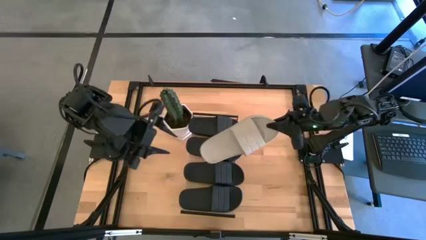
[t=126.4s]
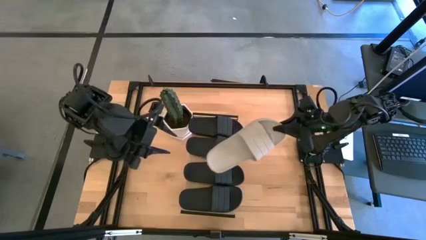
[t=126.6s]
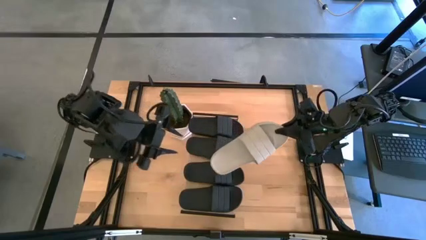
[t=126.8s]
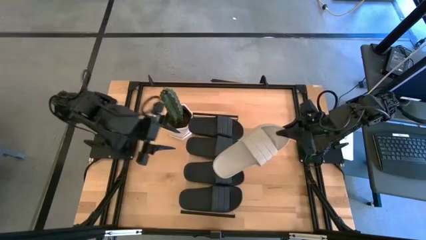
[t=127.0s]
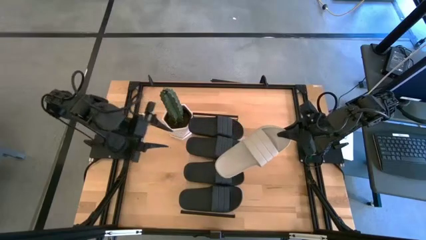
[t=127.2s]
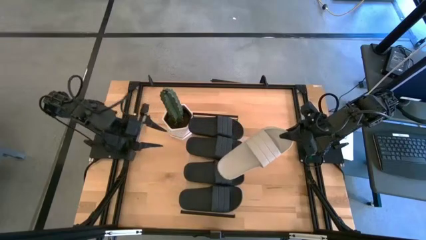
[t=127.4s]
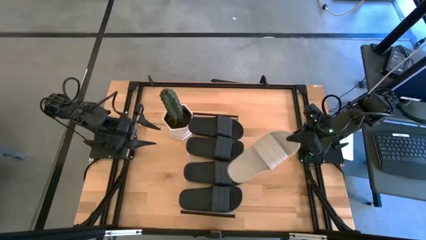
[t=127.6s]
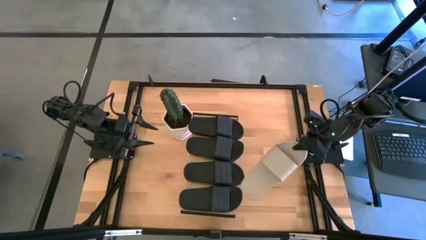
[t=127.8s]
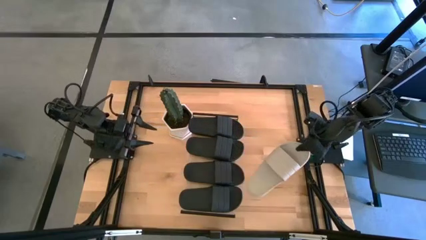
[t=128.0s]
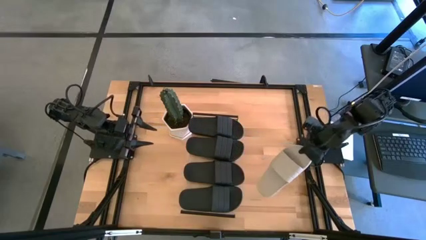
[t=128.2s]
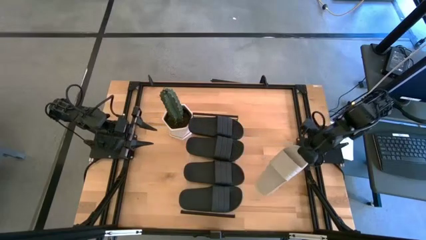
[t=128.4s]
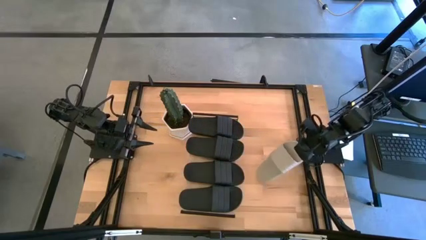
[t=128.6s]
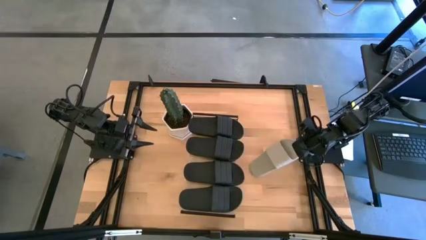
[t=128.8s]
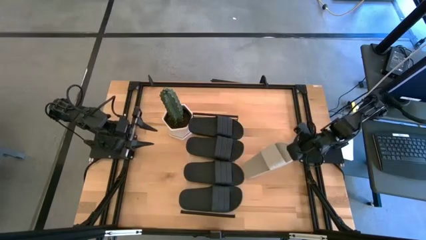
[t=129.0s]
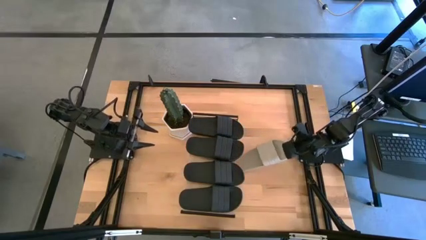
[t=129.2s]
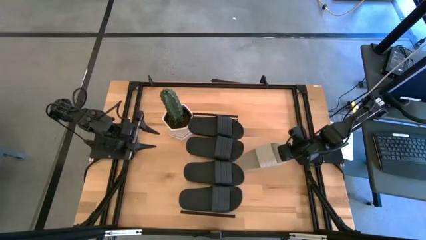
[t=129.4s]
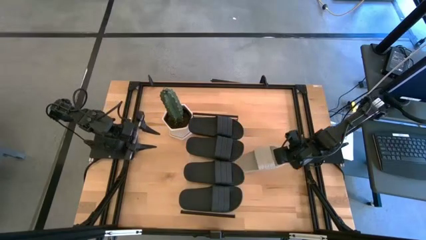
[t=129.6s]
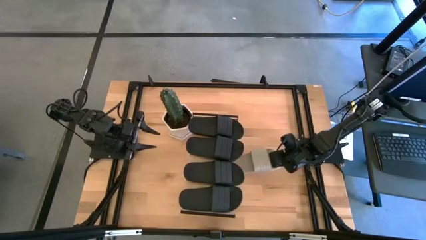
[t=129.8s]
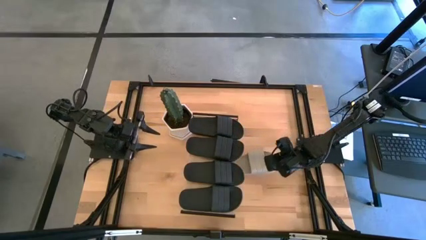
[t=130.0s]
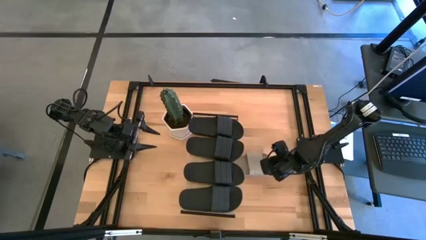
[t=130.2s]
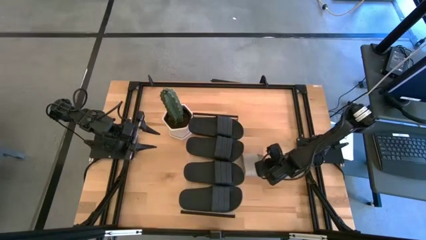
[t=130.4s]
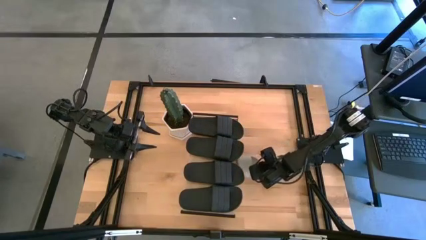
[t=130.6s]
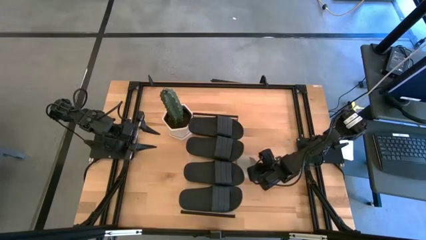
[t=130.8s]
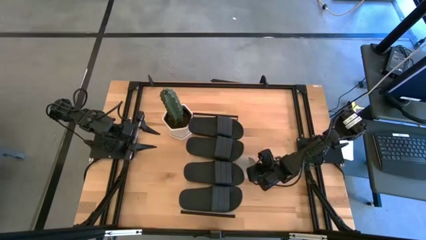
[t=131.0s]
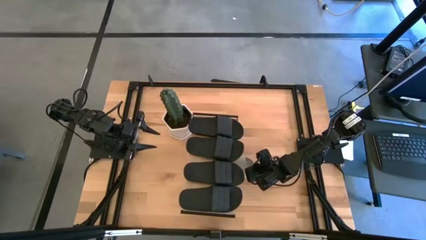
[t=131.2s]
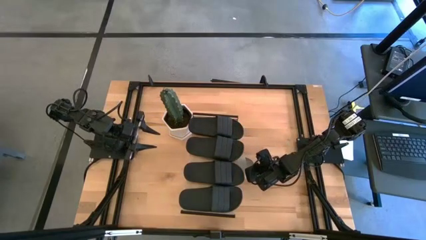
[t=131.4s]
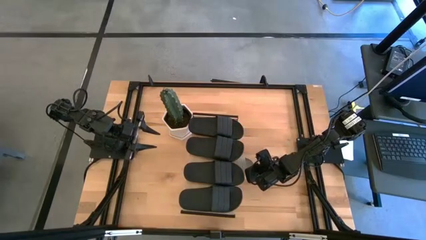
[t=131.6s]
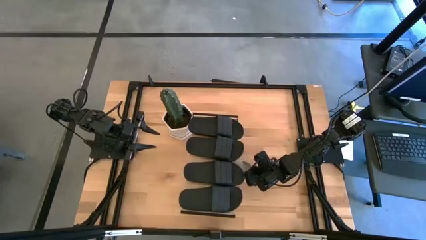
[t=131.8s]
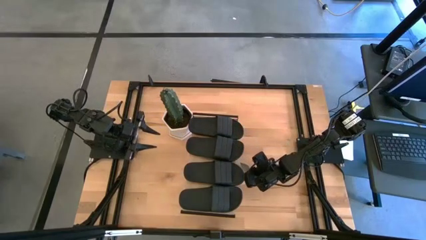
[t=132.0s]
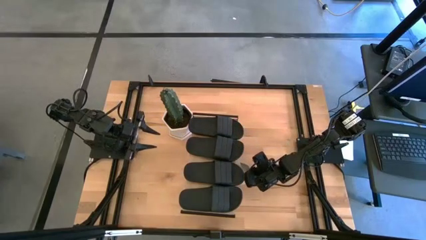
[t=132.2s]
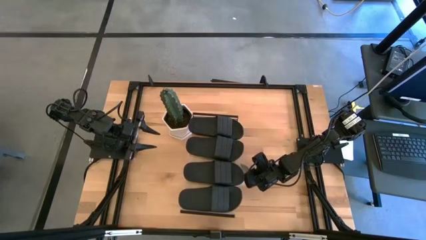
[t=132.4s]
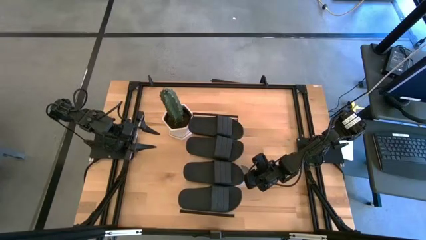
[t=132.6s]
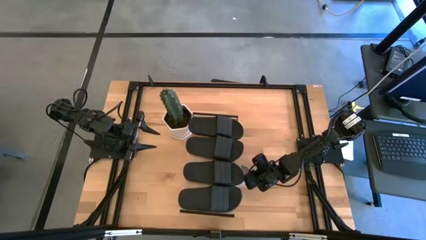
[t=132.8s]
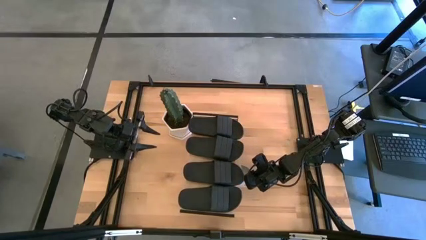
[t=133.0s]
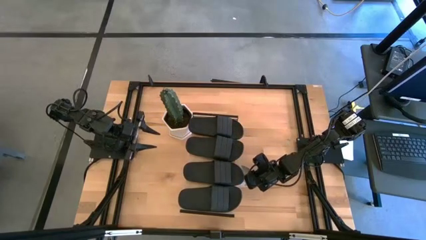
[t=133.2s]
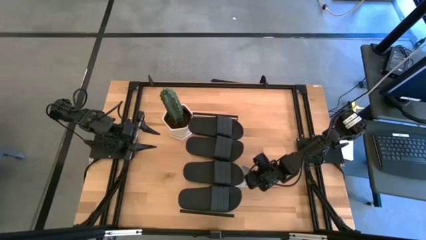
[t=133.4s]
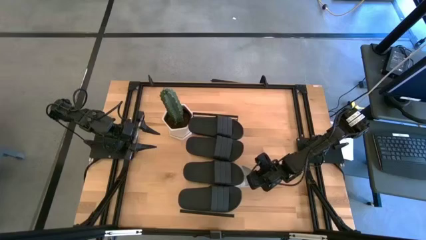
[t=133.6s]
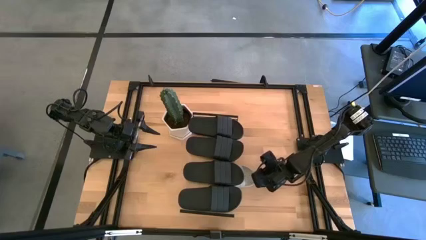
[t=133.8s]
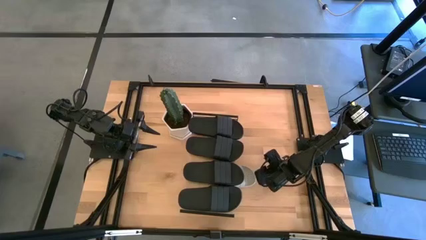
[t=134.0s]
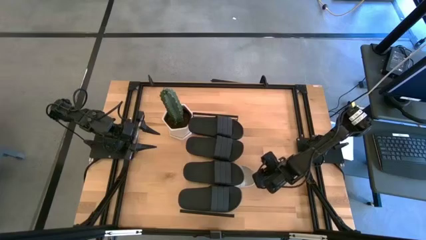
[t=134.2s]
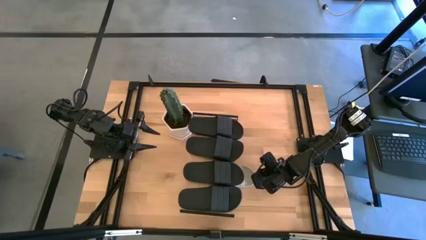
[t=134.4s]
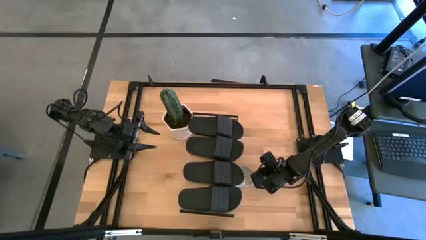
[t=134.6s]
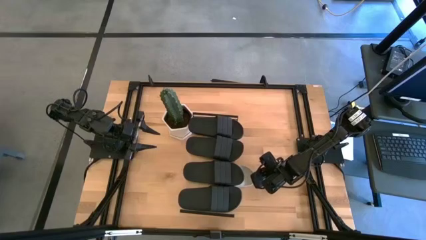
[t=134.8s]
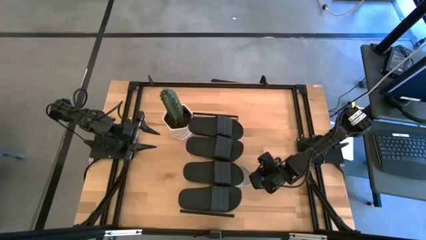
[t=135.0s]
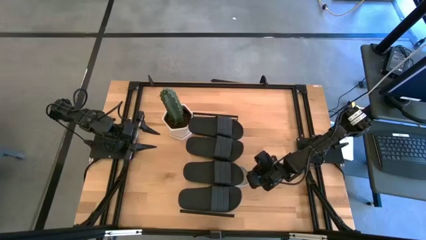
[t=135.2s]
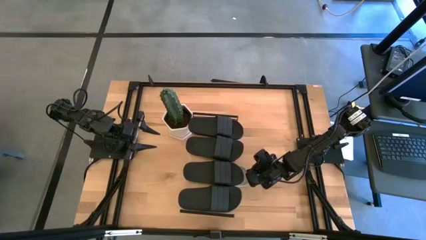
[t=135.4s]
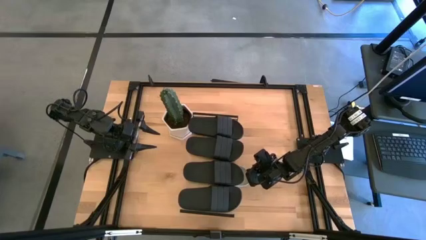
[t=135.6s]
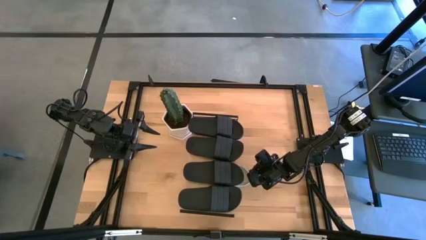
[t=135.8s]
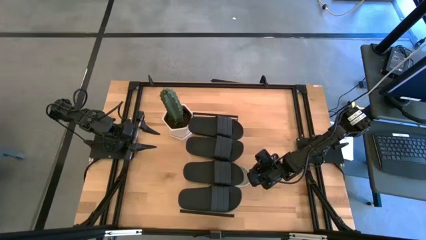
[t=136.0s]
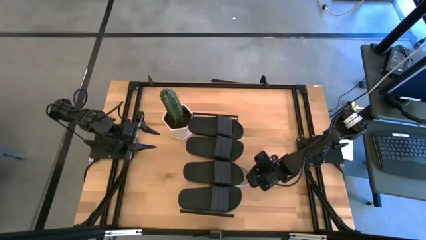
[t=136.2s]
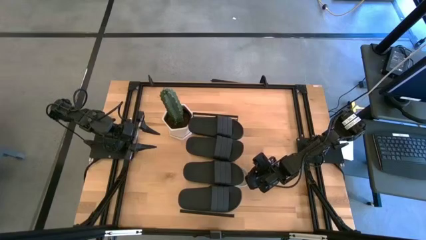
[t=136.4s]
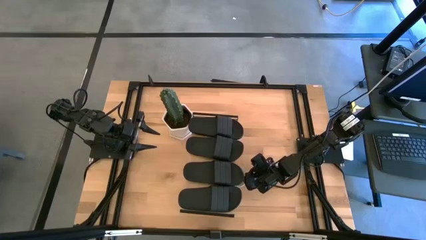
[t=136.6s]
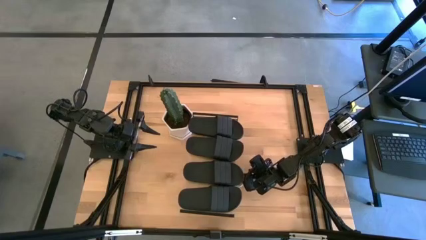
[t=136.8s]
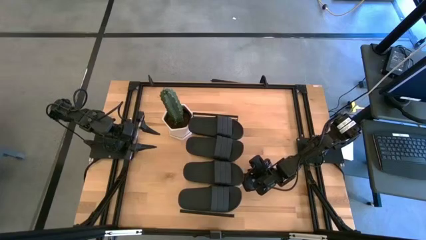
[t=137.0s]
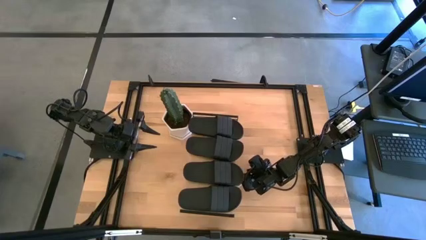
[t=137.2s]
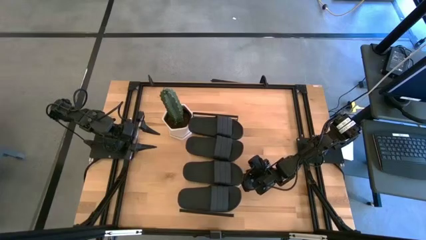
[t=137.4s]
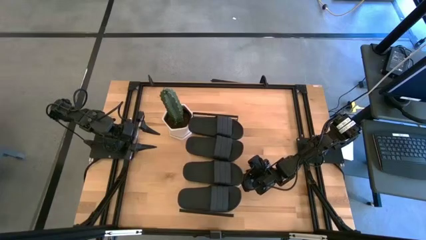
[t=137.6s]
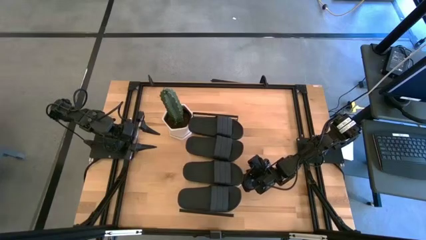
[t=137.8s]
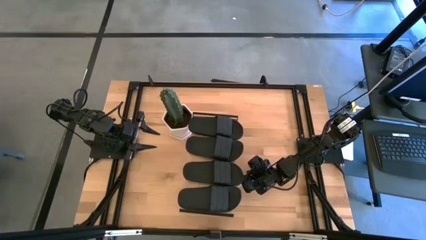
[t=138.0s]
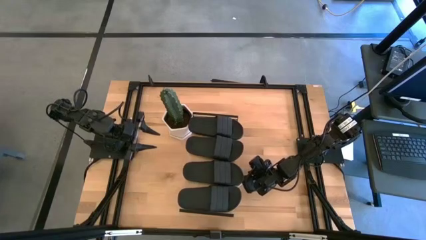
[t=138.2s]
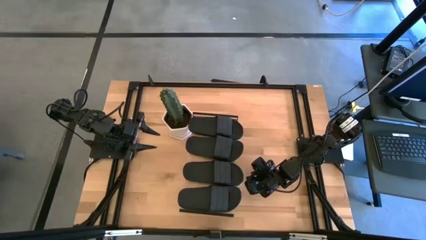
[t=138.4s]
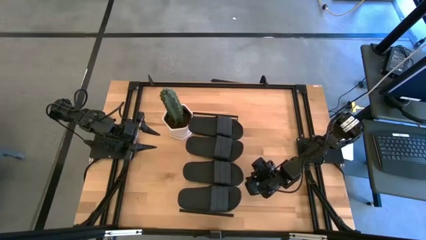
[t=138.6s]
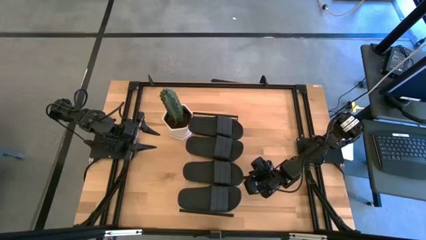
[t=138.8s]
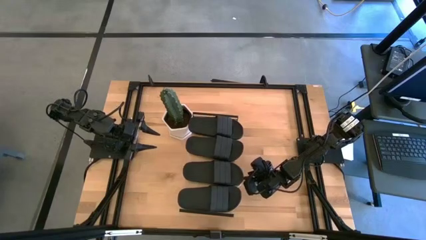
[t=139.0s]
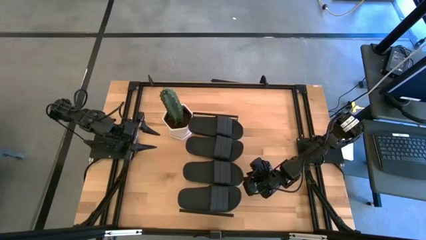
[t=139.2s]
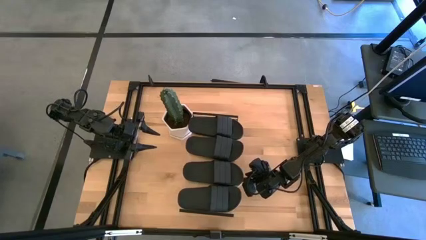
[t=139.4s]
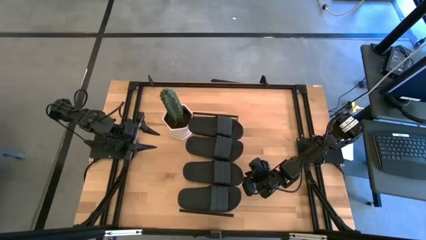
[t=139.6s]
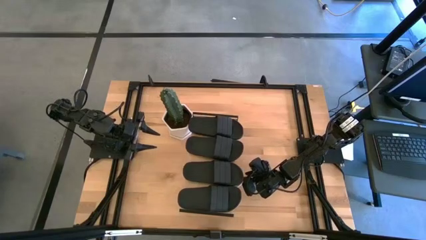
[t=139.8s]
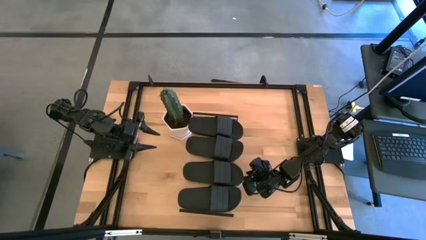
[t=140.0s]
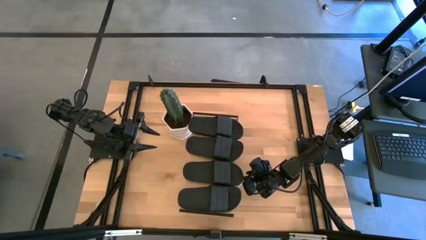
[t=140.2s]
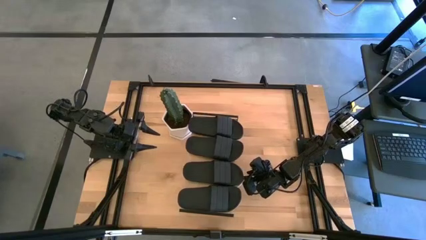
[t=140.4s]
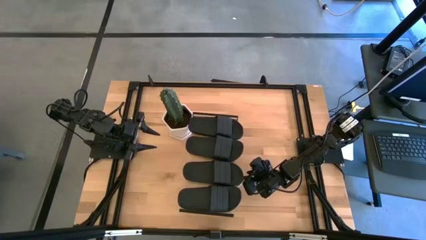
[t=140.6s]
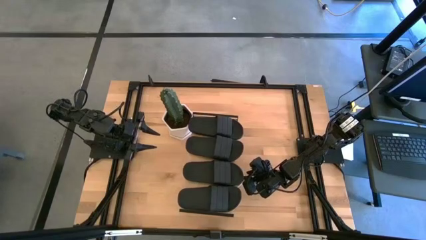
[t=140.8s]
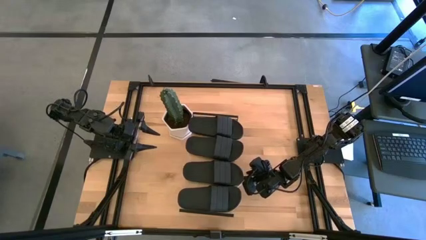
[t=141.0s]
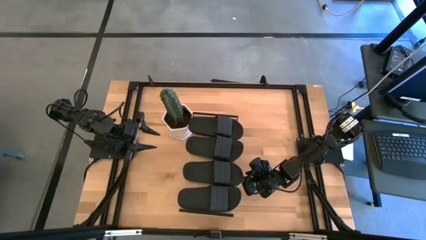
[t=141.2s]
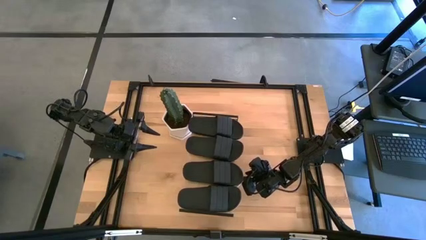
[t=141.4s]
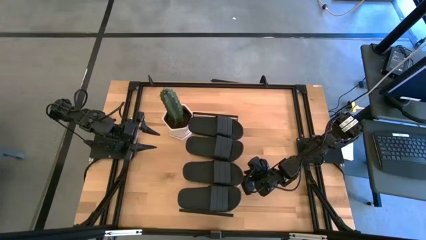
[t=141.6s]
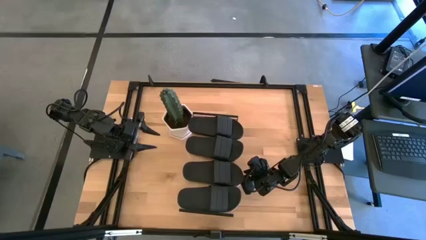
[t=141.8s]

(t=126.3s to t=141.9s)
Task: Pick and place slides into the shelf
Put the gray slide under the shelf
